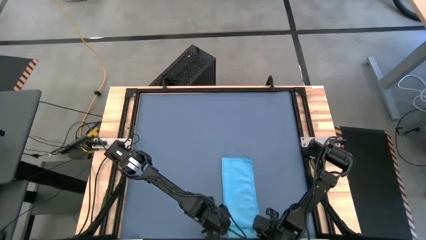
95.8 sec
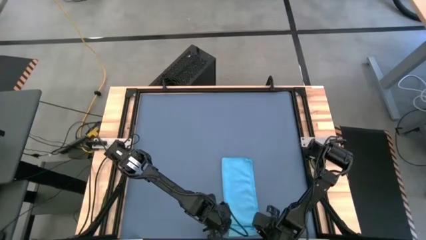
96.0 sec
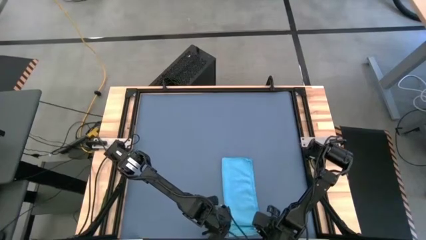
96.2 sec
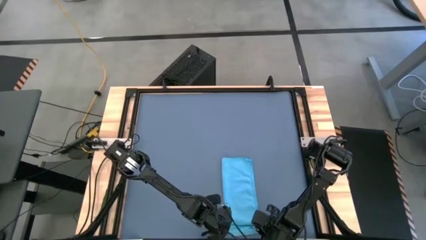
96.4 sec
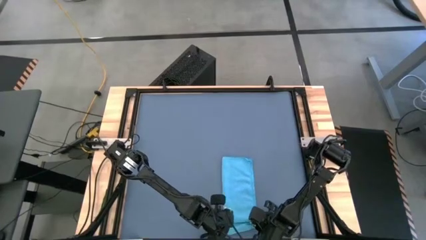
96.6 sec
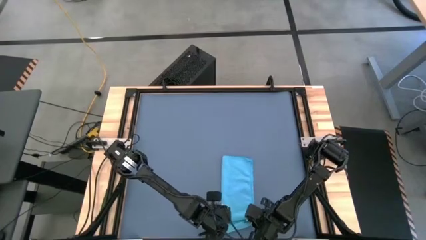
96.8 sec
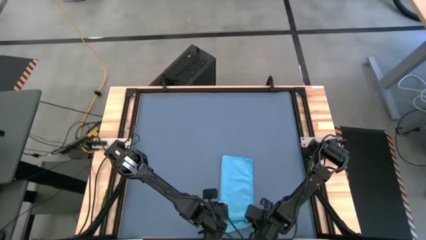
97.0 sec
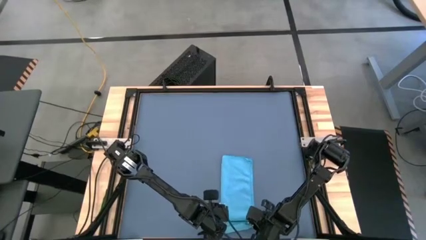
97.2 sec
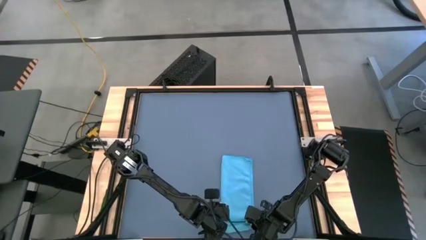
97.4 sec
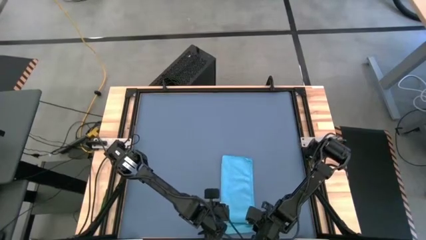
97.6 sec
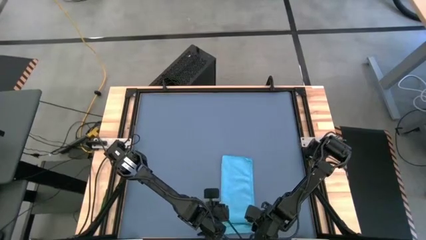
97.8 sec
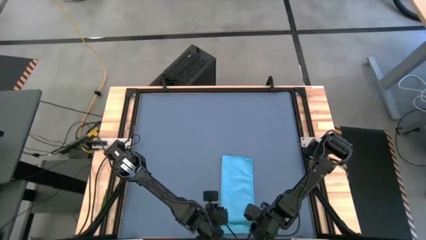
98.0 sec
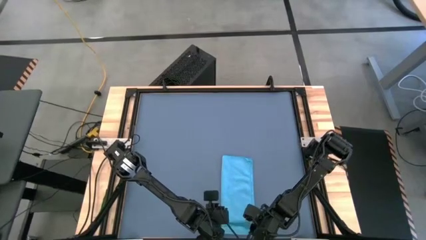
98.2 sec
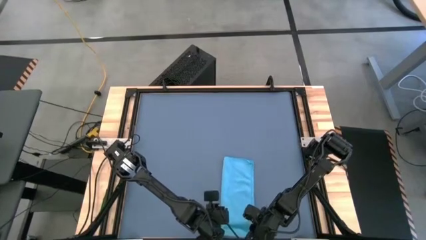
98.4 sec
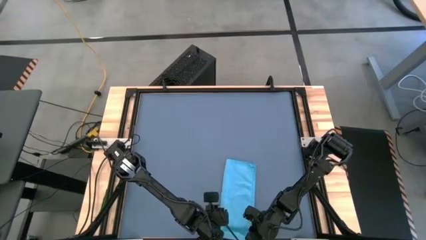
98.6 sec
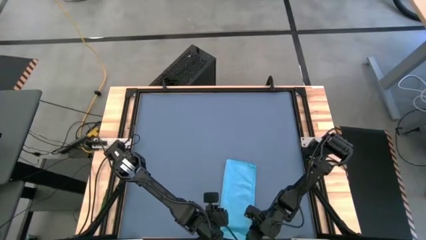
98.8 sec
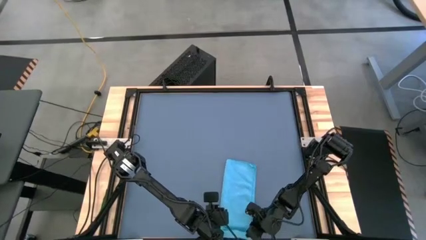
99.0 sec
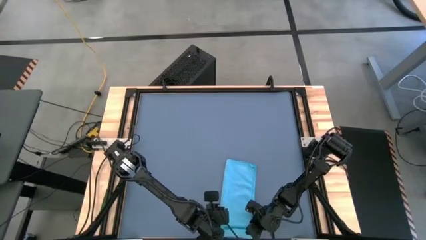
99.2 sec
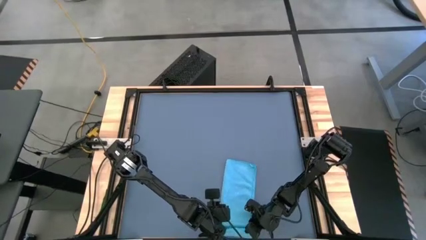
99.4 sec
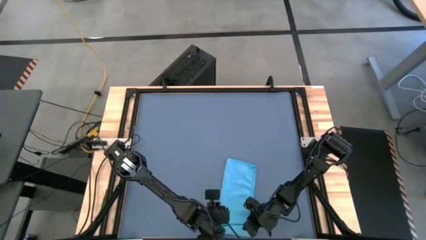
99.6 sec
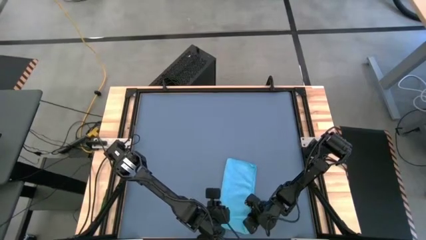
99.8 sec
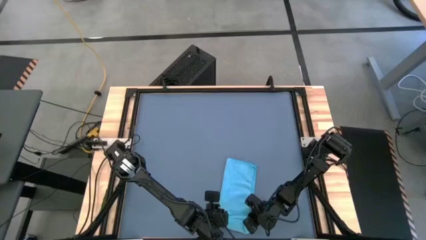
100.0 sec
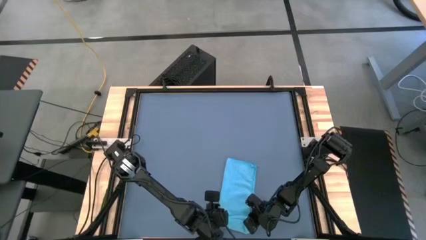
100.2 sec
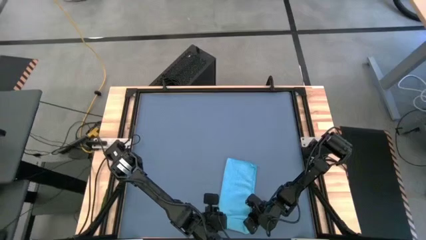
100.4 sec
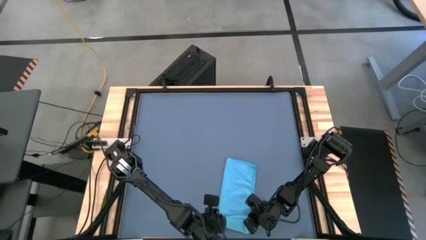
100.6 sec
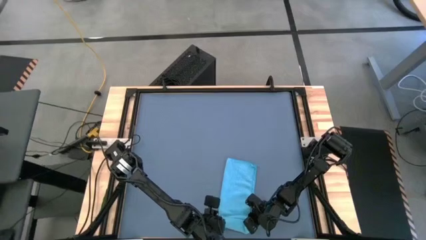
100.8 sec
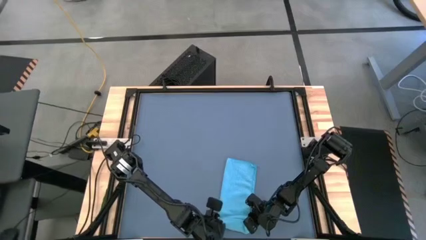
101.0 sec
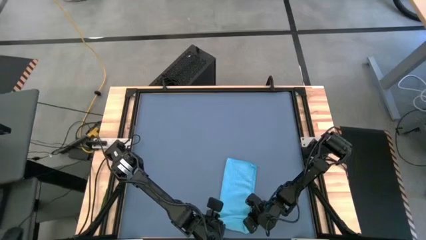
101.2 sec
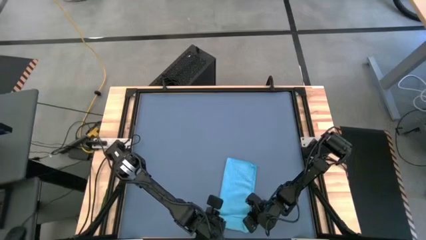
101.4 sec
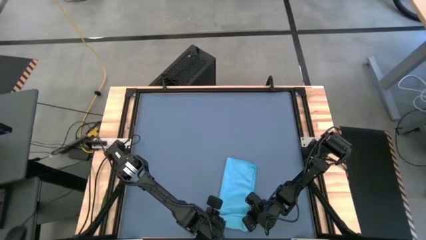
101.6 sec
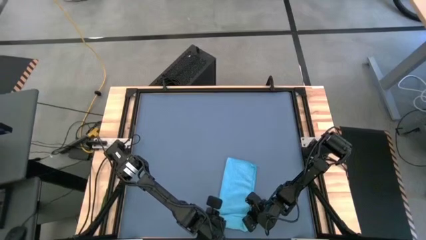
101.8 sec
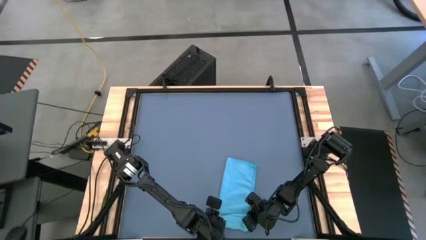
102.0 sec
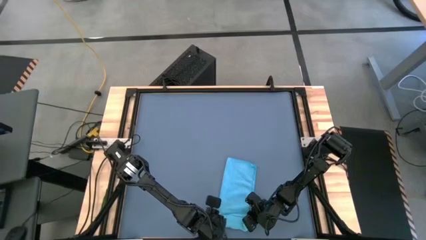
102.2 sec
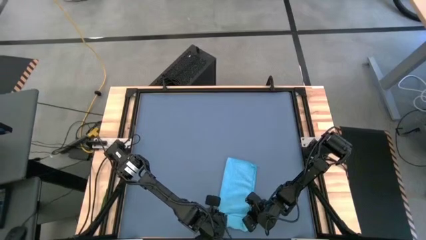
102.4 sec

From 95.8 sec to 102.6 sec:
Task: Roll towel
Roll the blue microfiber towel

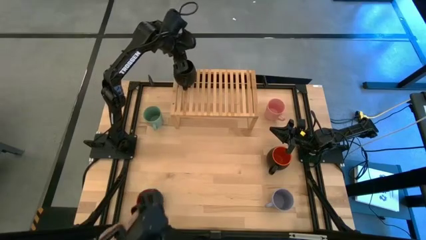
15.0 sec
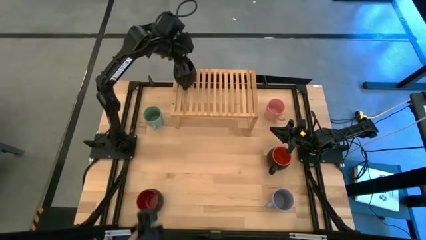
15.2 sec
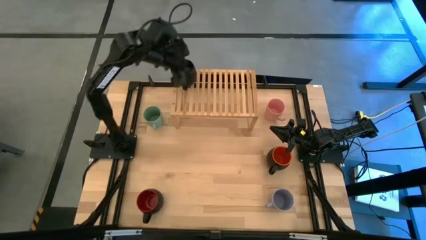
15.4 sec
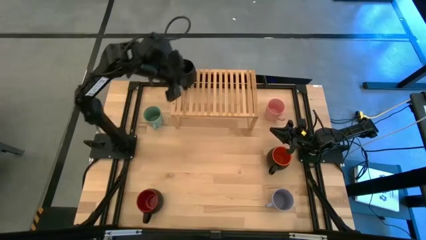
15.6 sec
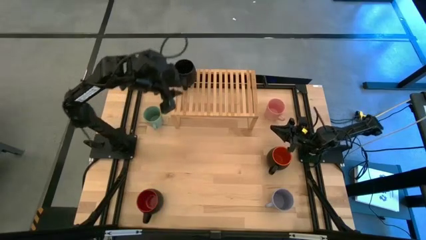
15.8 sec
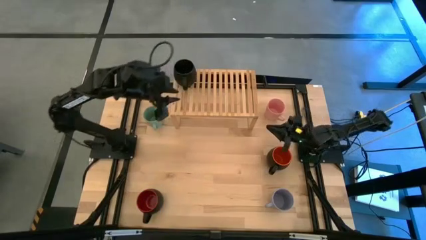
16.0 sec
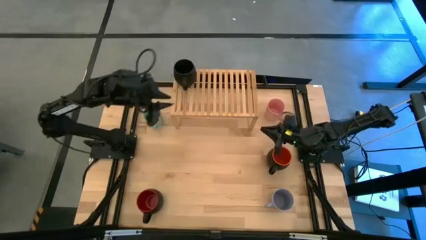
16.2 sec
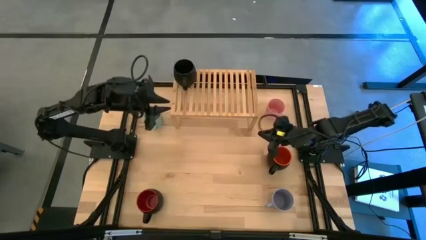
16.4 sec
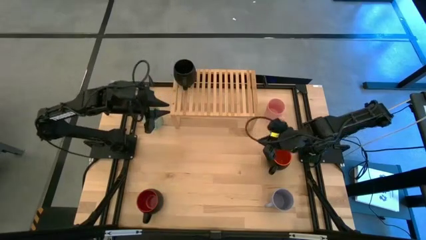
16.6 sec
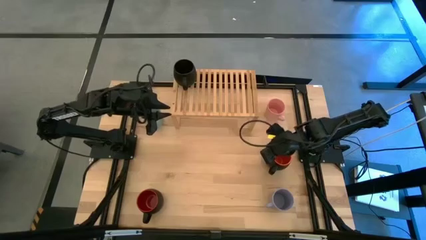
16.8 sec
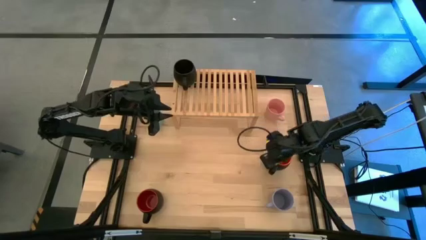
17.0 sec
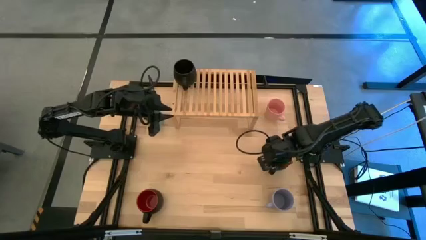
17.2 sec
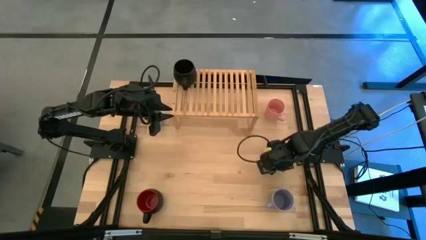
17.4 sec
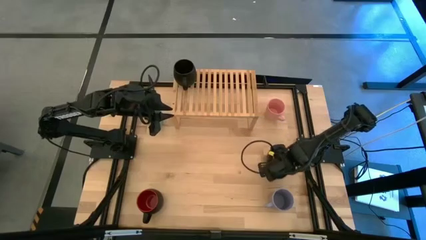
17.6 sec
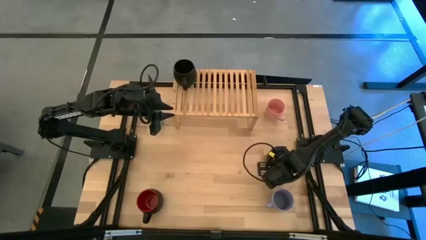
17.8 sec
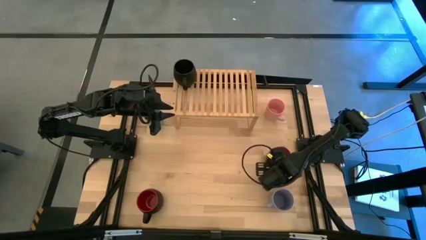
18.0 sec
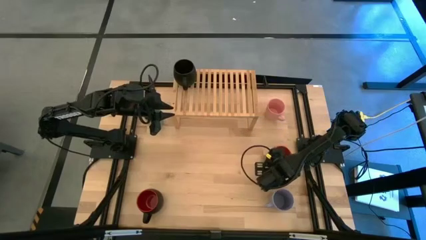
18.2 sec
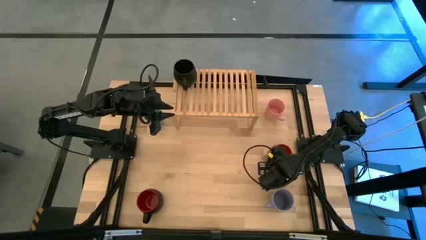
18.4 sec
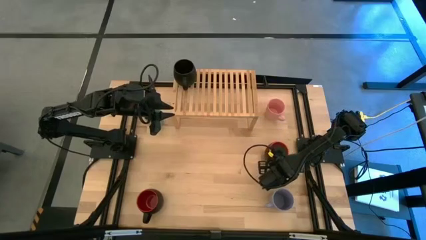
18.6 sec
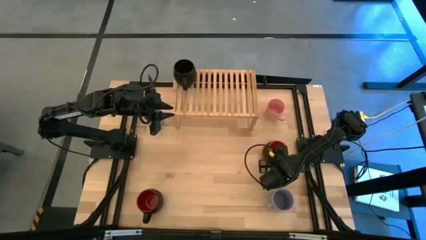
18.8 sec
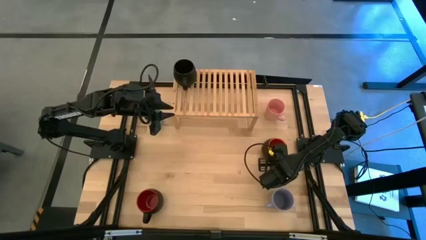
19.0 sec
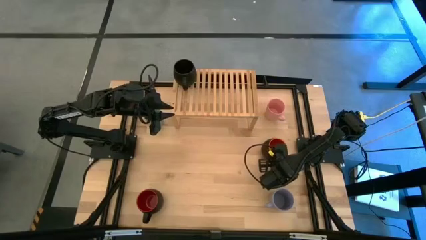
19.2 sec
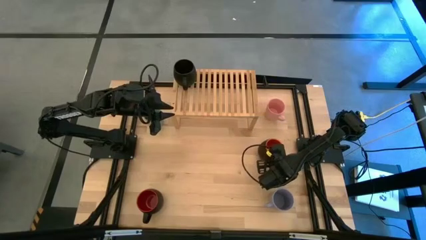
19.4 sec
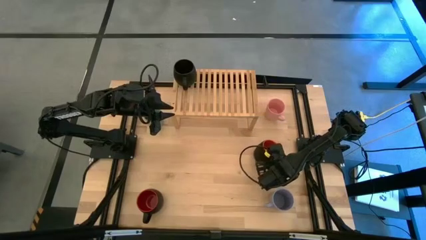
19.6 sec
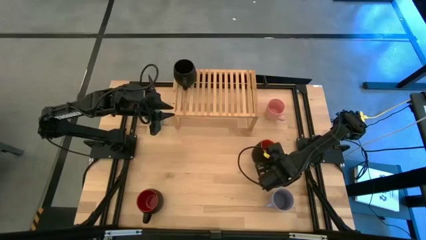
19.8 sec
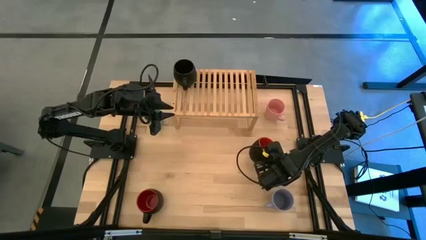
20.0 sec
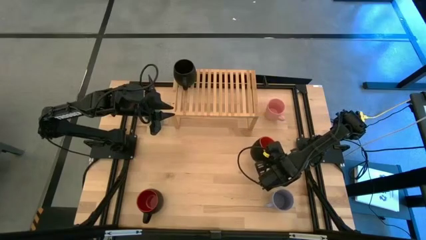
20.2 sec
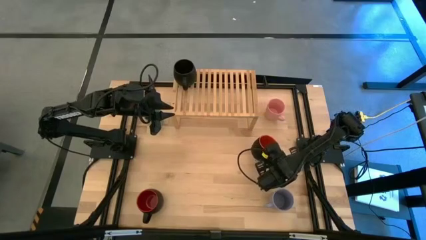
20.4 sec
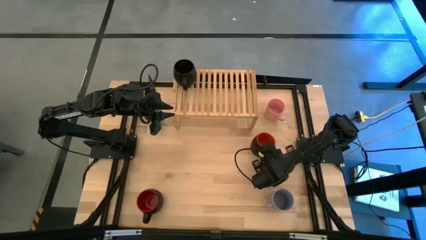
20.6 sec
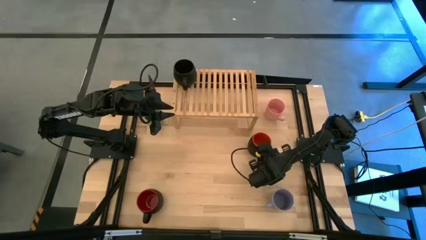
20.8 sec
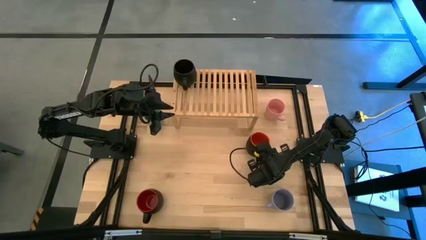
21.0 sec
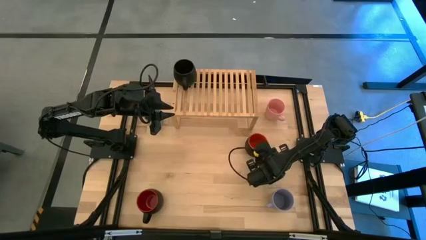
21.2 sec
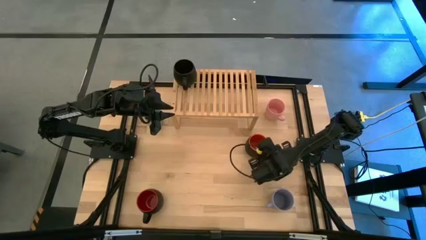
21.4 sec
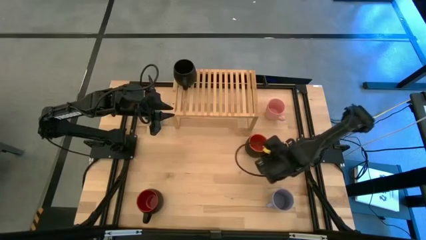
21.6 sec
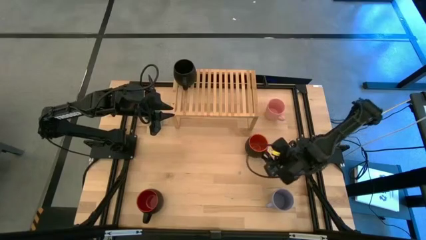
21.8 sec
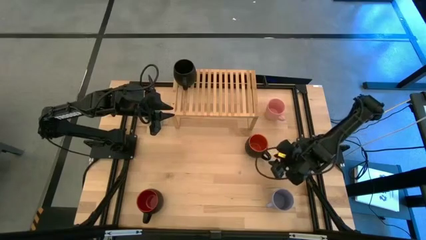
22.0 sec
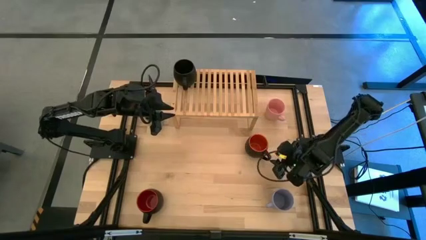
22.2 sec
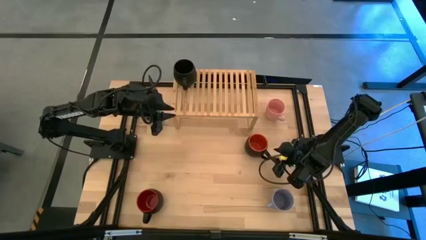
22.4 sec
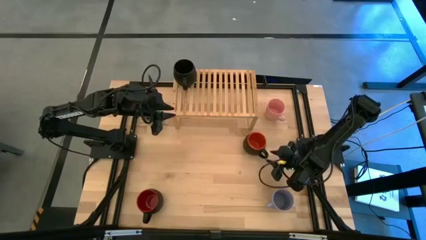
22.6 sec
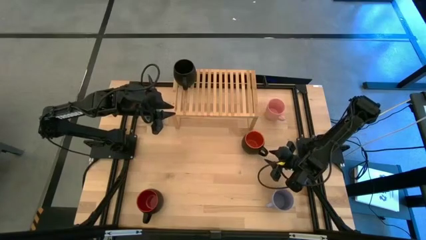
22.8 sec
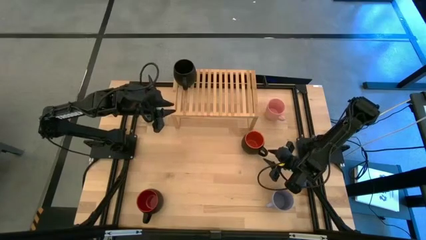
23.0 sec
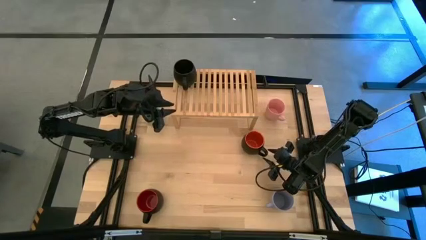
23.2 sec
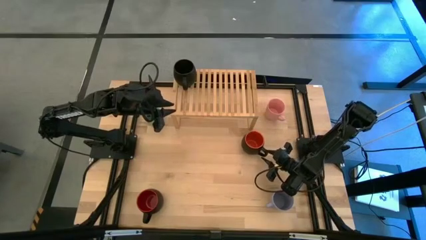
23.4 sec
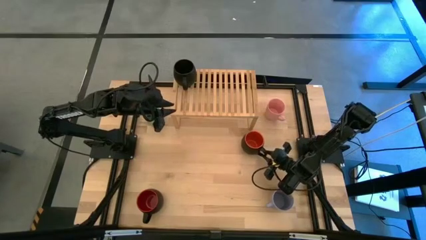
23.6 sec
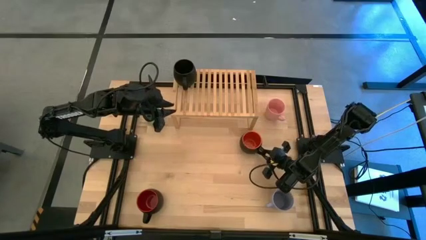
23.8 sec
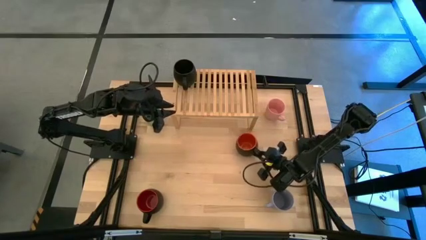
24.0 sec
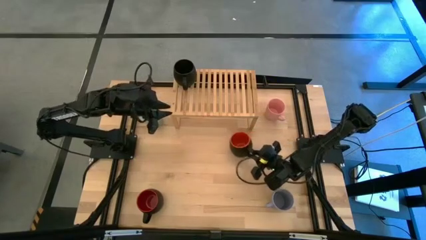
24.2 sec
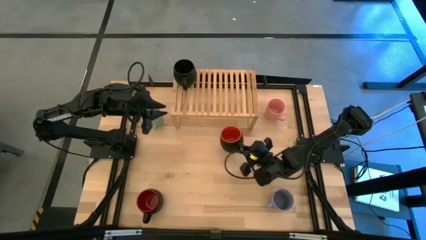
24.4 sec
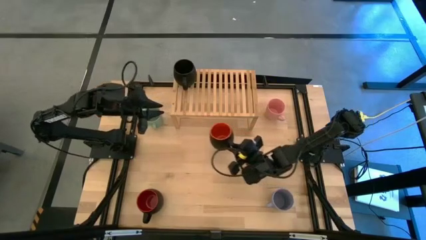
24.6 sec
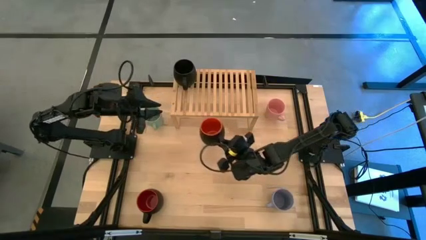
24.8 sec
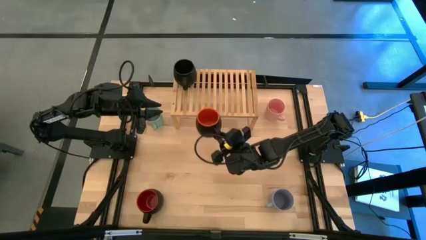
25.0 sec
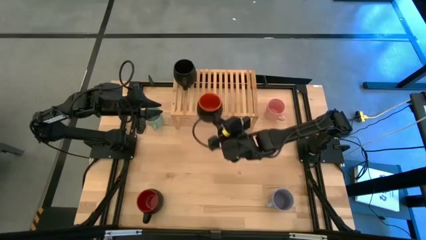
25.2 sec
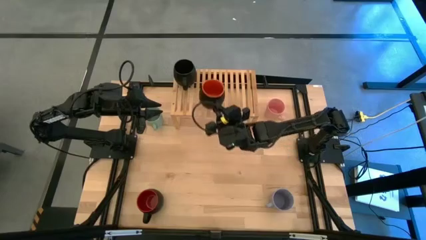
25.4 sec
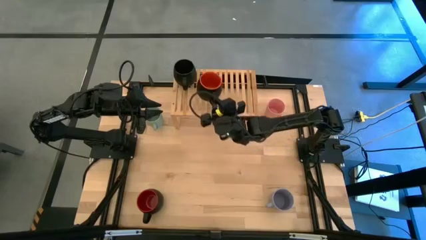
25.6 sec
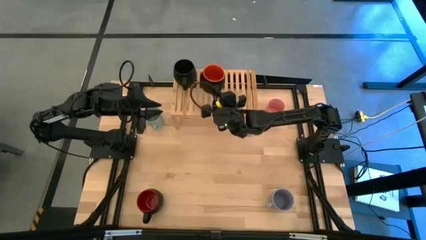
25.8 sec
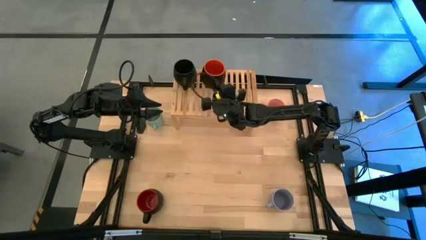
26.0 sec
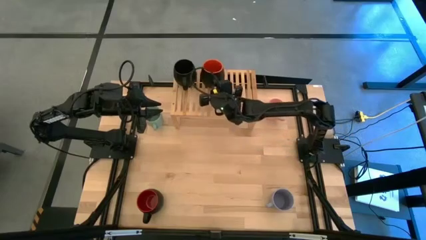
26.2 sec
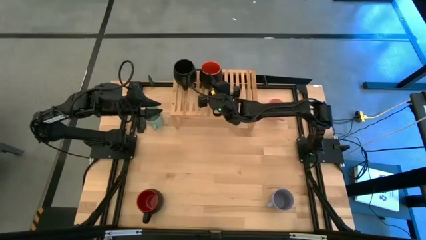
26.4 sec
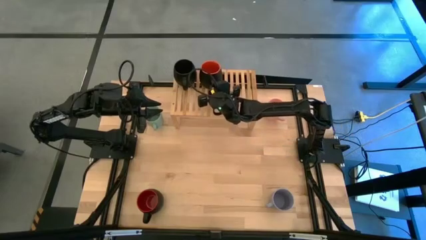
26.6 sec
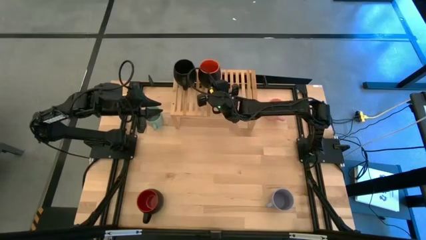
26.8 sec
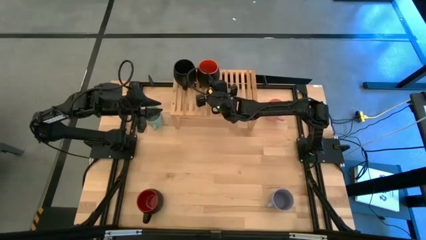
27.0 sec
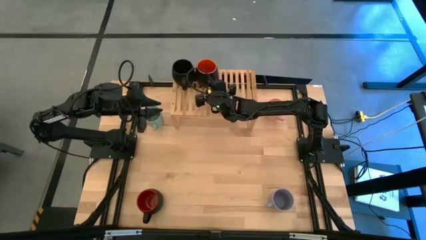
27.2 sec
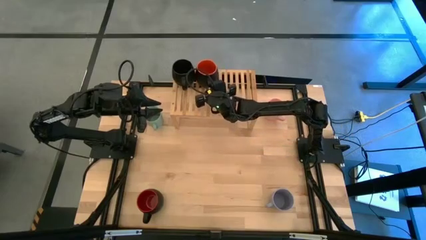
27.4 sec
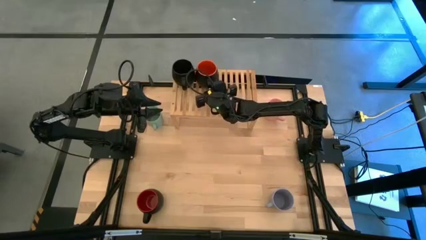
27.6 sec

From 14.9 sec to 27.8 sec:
Task: Place coffee mugs
Put the orange mug on the shelf
